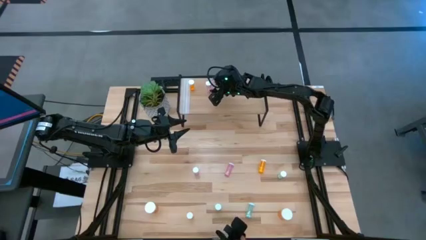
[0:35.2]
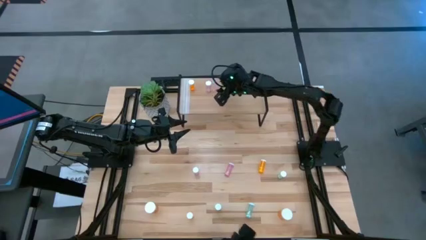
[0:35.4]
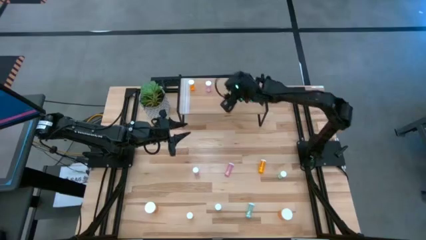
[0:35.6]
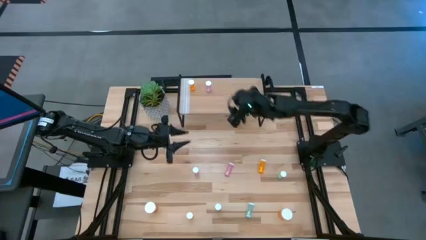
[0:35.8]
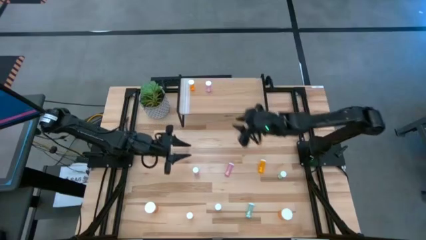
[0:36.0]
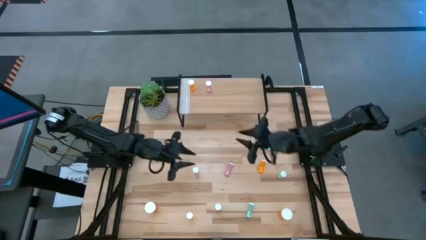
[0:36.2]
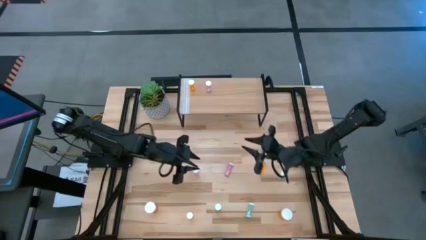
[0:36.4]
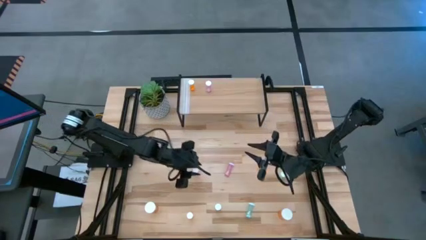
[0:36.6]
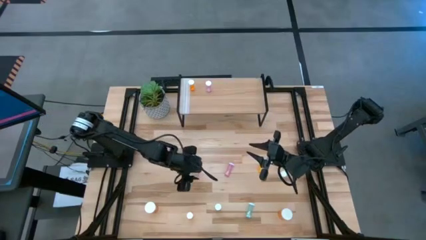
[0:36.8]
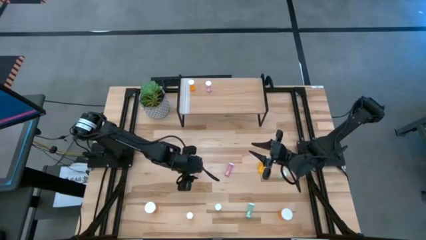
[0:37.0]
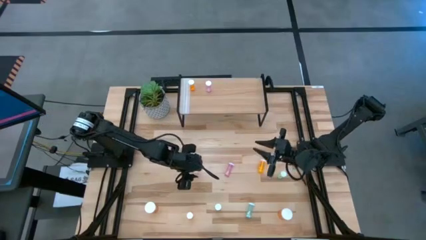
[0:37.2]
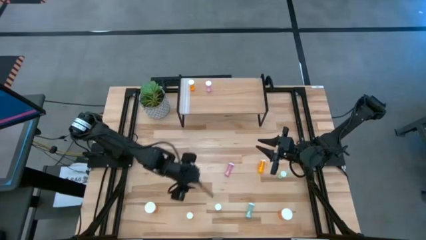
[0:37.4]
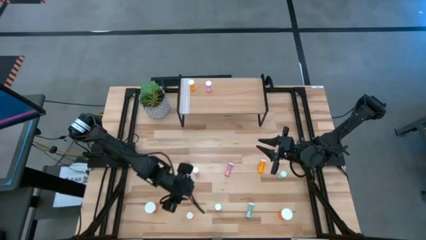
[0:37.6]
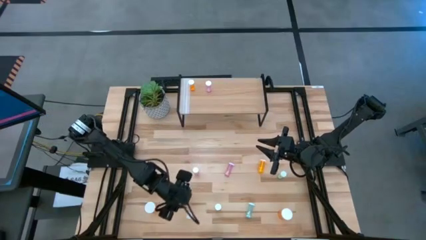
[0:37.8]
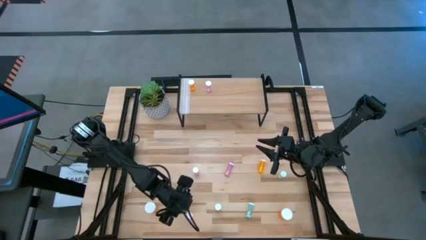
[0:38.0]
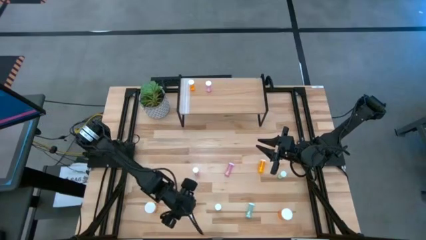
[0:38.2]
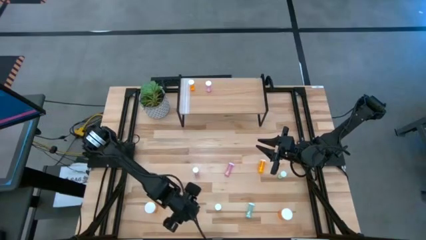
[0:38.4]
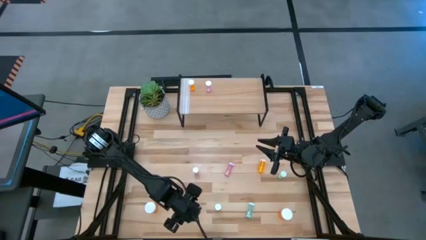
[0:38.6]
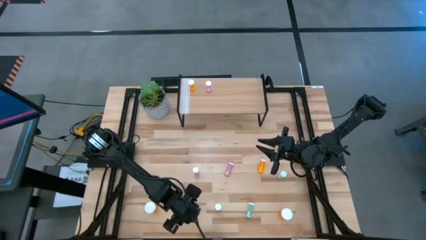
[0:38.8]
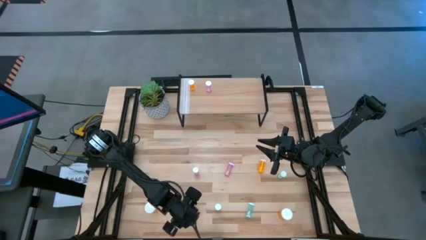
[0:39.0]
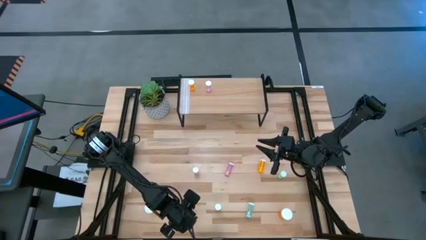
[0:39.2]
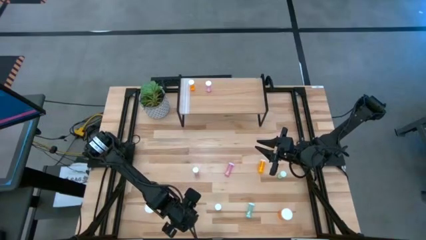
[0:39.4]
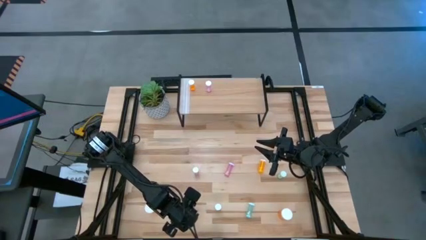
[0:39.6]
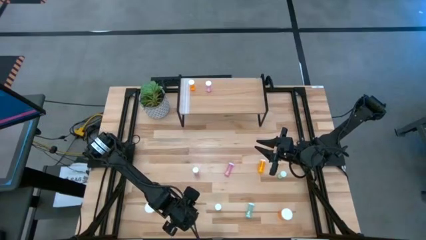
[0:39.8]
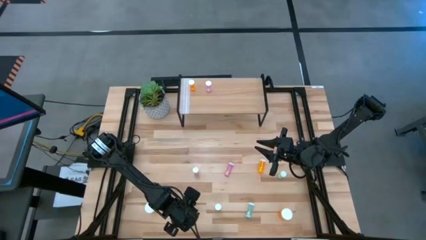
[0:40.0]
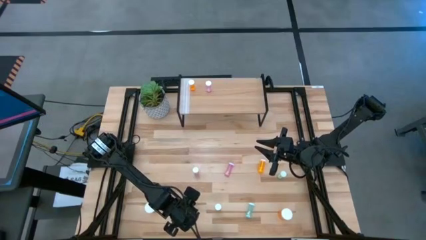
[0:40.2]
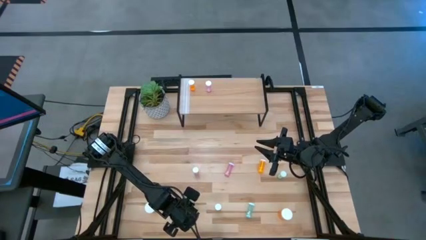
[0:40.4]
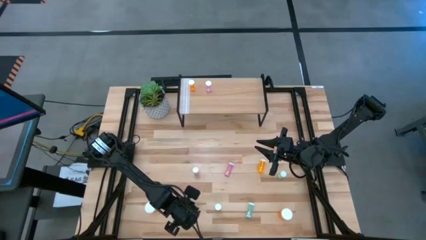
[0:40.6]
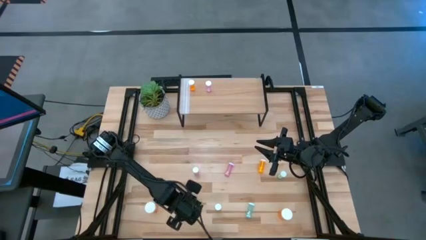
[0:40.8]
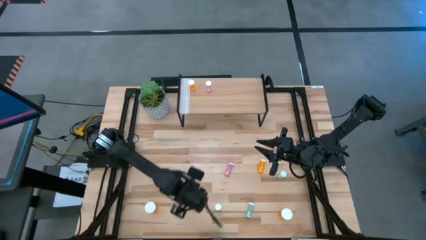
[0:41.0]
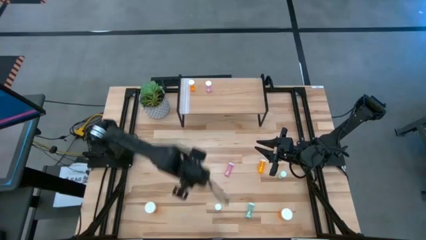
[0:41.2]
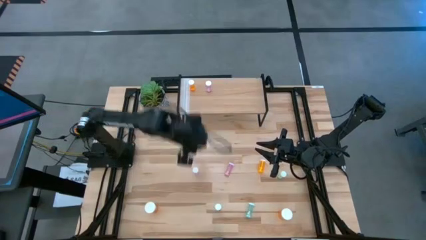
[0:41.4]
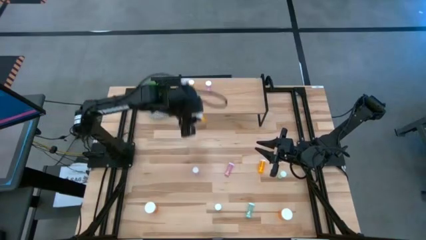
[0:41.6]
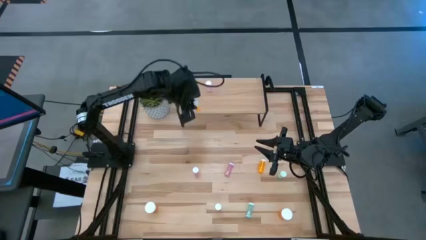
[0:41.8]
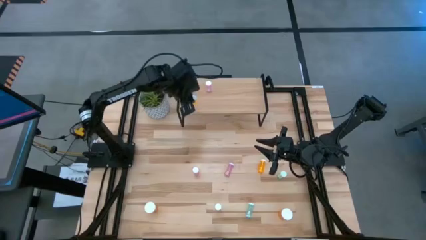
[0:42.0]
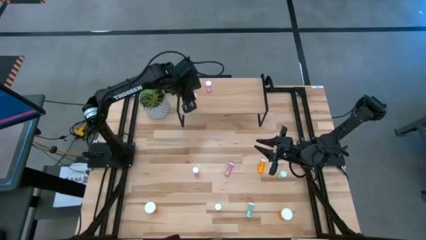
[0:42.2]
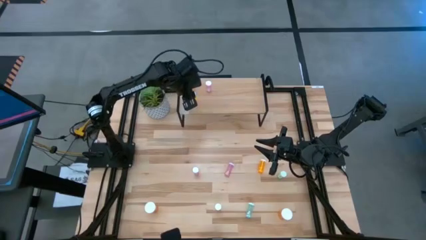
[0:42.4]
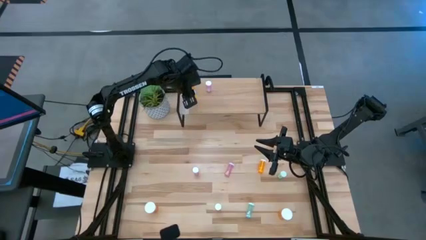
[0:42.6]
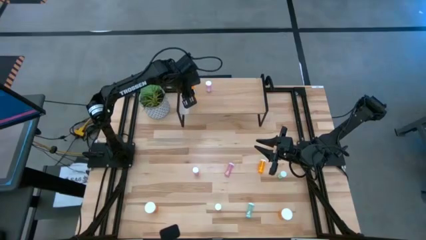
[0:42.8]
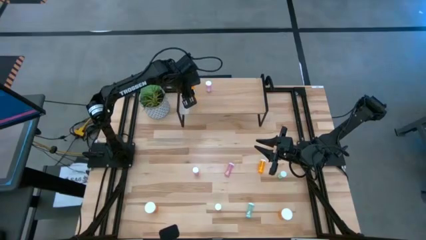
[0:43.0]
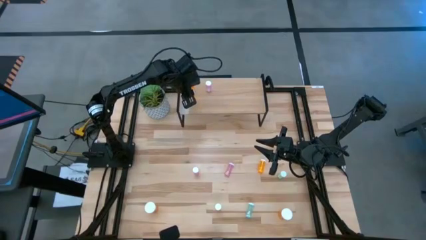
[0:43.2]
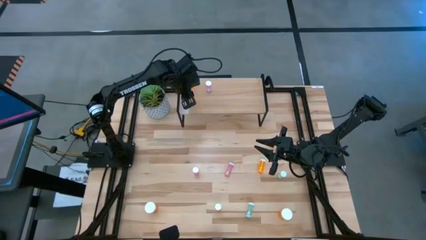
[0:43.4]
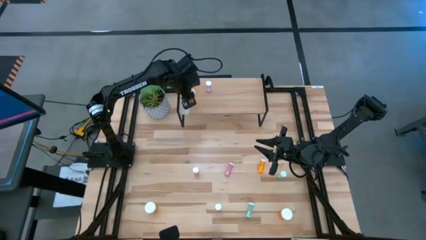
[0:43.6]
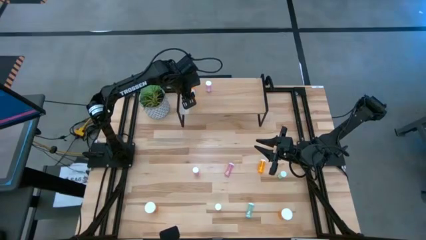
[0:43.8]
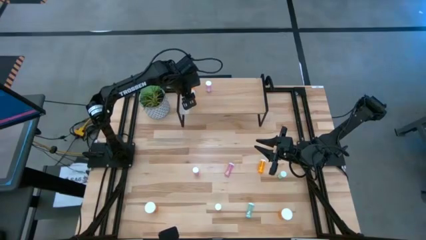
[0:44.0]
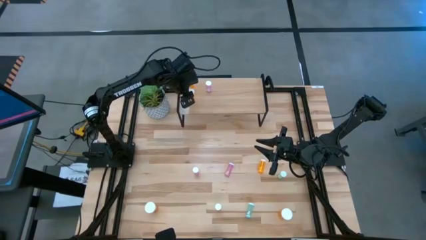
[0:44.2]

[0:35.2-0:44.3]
Task: Pick and place medicine bottles onto shelf by color
Put the bottom small orange pill bottle on the shelf aligned with the other small orange pill bottle
